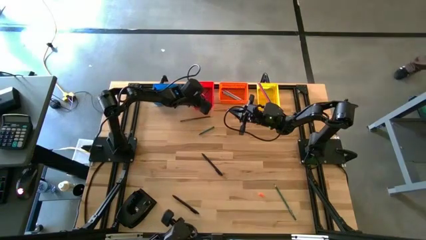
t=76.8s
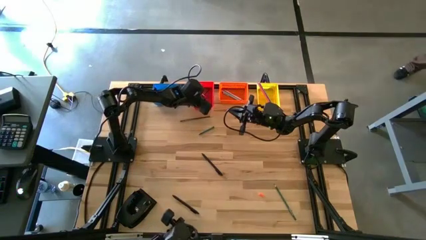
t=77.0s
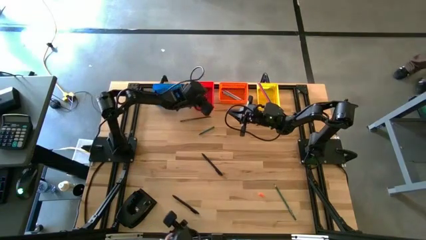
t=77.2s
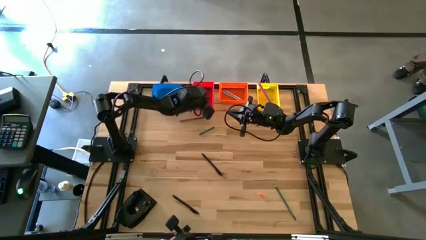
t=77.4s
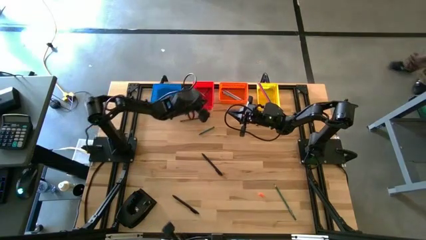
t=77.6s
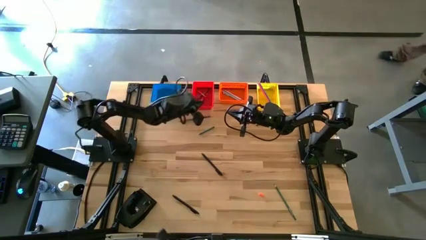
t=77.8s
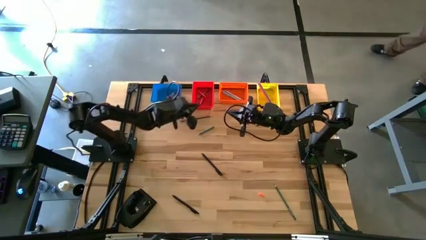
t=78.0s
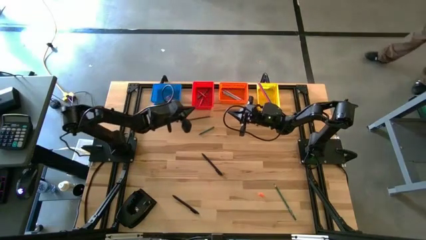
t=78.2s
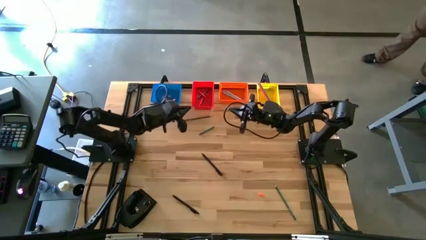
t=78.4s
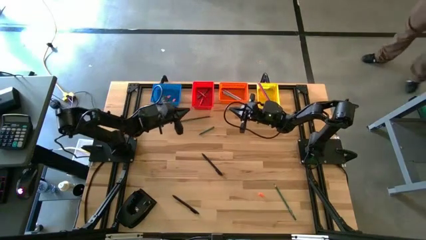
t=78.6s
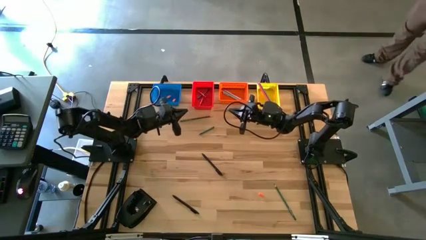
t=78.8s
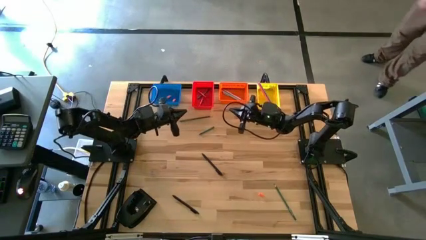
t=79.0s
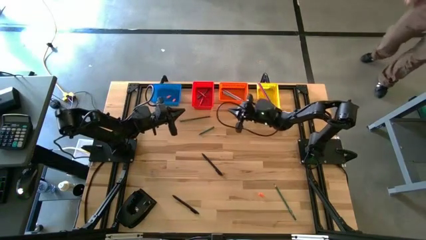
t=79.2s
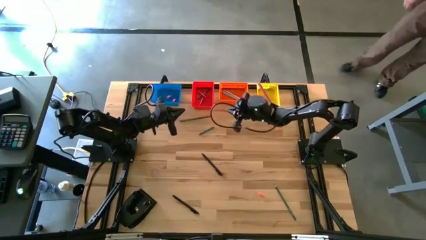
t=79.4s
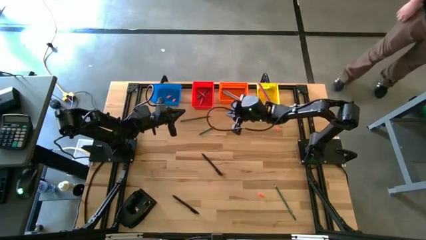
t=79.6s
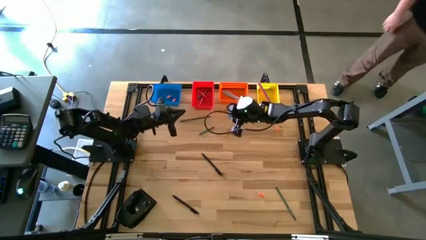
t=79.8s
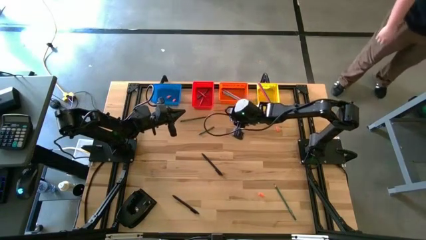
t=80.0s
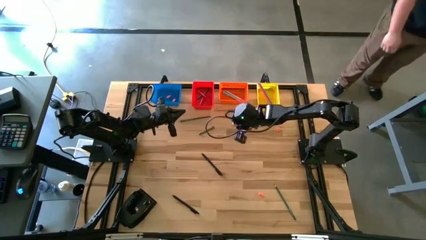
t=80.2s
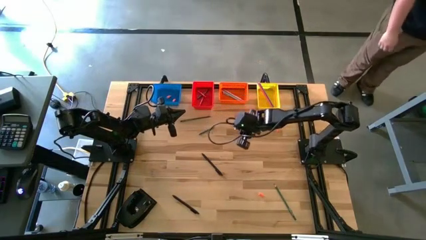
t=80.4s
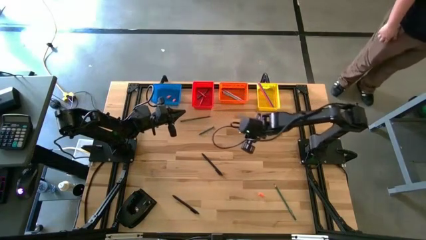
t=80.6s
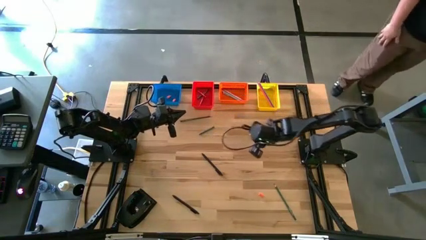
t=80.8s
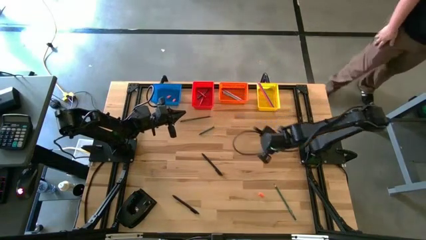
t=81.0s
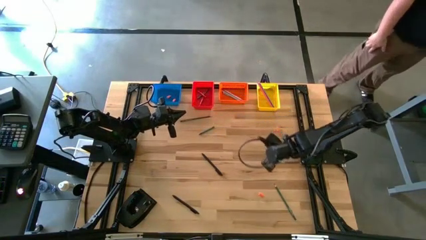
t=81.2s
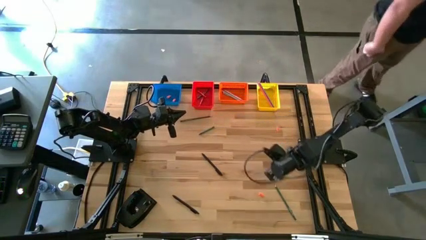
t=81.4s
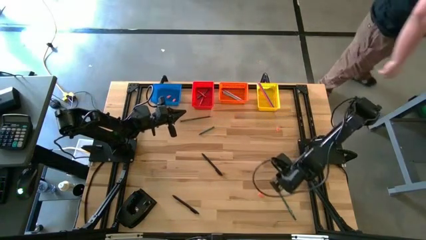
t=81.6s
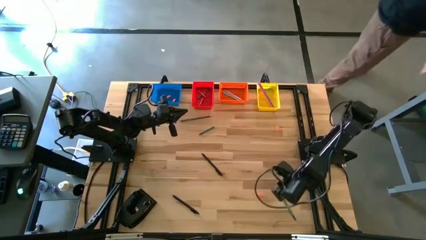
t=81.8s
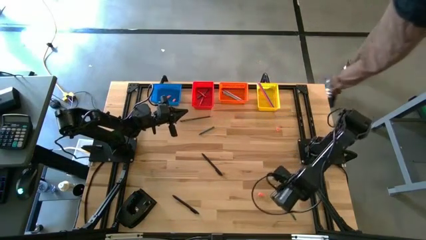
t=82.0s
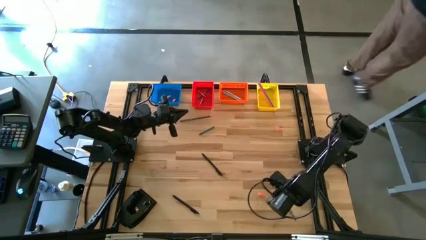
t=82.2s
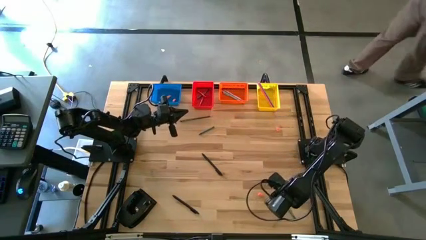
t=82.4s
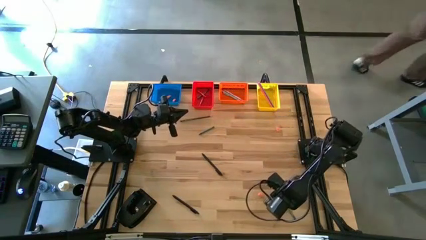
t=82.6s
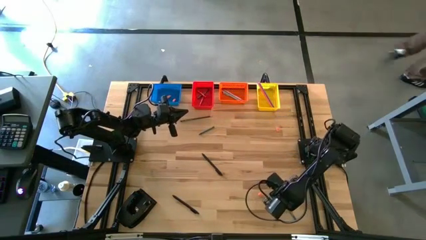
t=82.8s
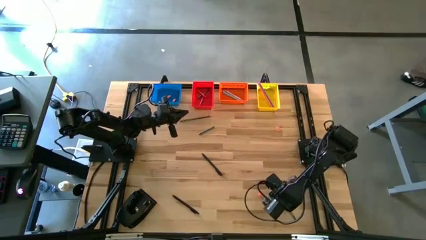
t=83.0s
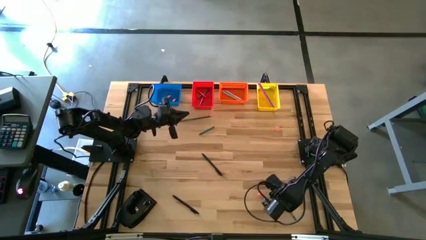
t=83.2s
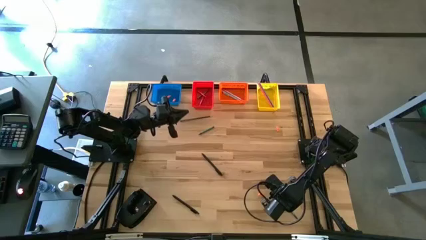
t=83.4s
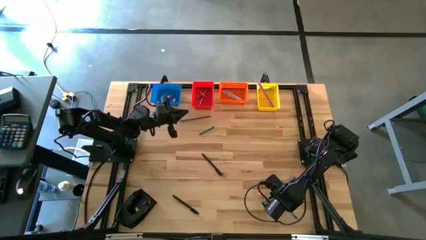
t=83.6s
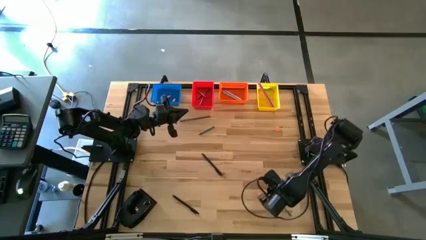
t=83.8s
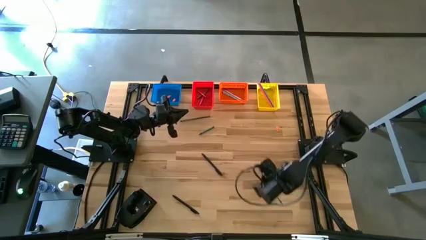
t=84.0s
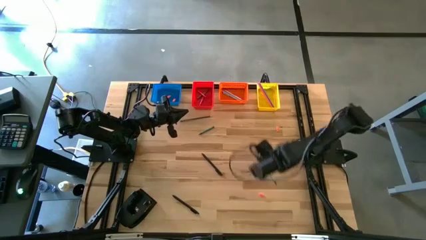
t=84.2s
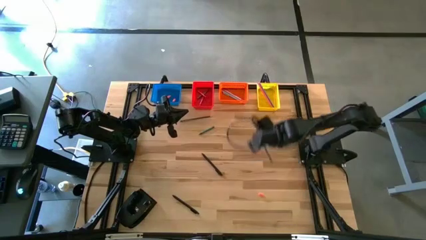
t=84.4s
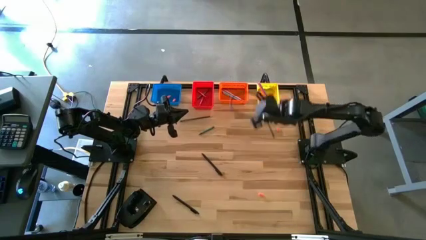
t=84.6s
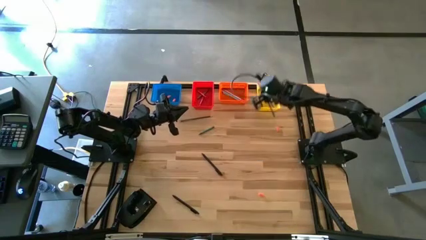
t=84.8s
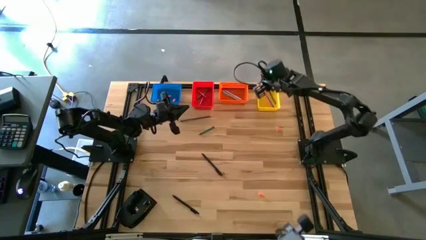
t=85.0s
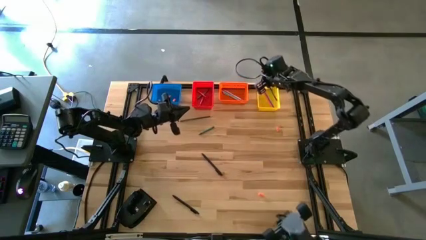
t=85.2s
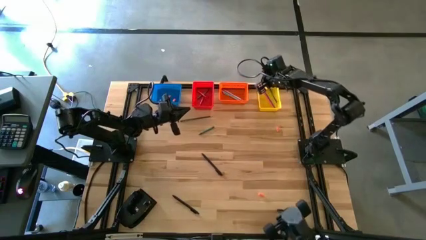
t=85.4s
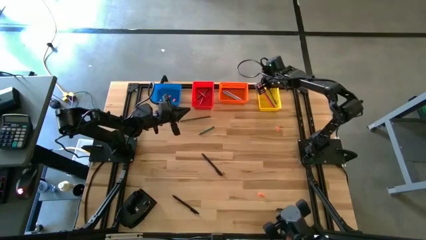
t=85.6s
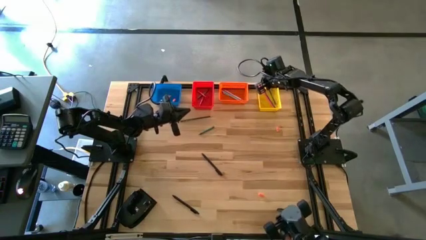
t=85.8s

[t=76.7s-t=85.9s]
Task: Sort crayons/erasers/pens/pencils in bins
Put the green colored pencil into the yellow bin

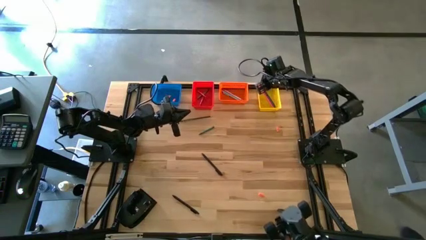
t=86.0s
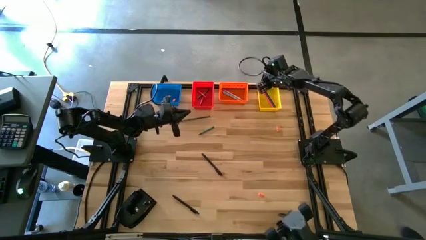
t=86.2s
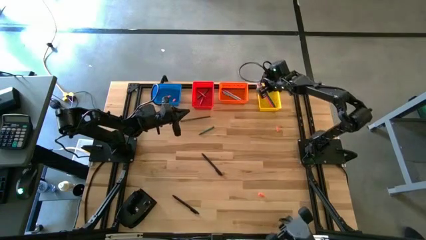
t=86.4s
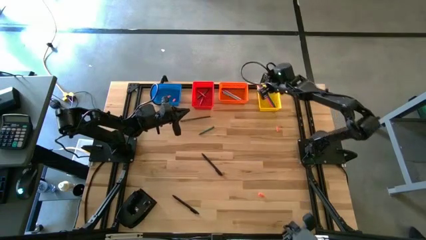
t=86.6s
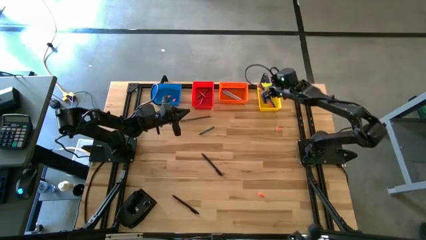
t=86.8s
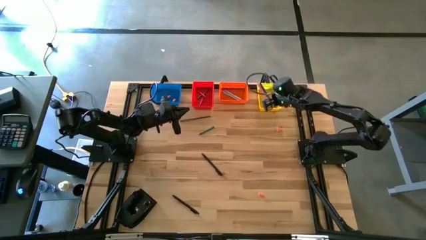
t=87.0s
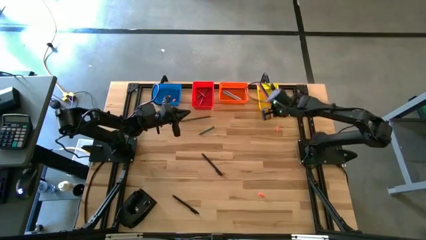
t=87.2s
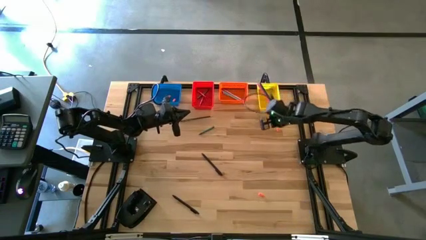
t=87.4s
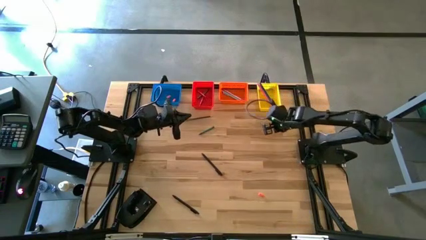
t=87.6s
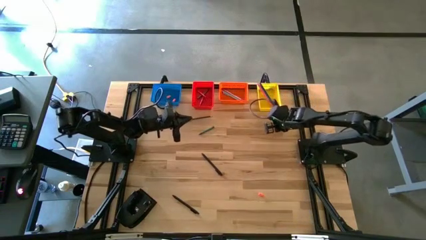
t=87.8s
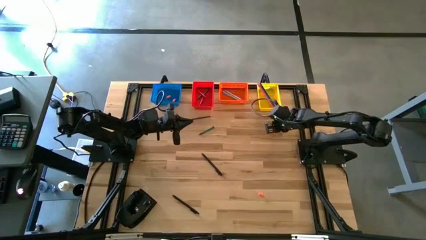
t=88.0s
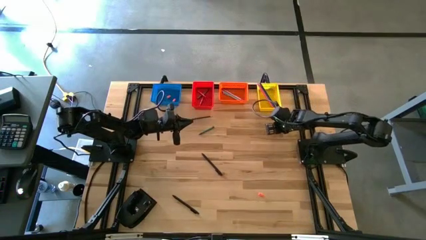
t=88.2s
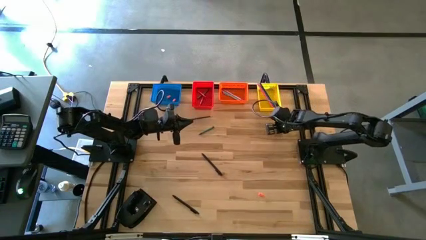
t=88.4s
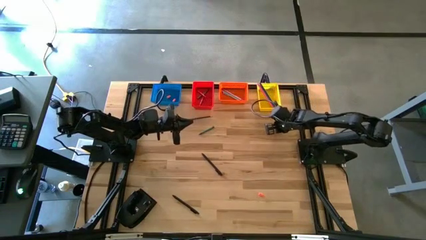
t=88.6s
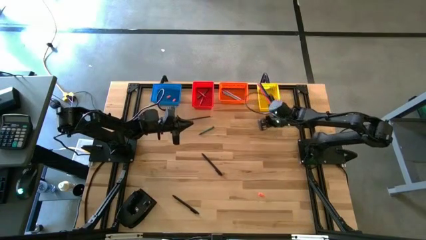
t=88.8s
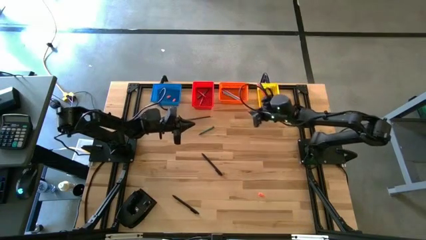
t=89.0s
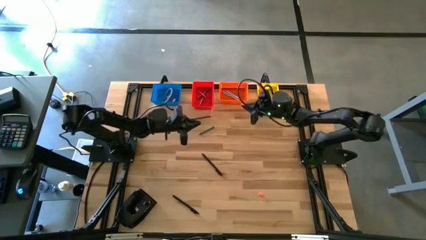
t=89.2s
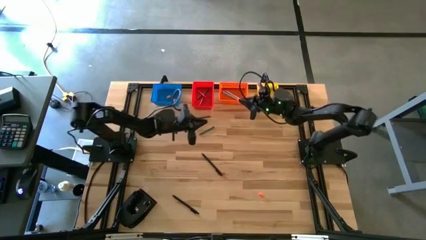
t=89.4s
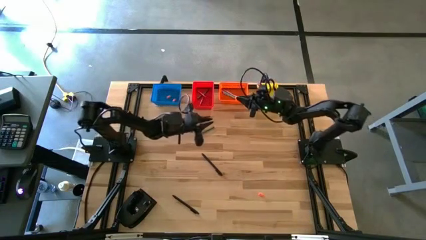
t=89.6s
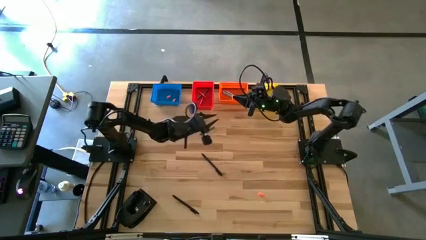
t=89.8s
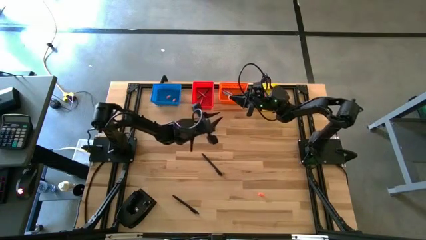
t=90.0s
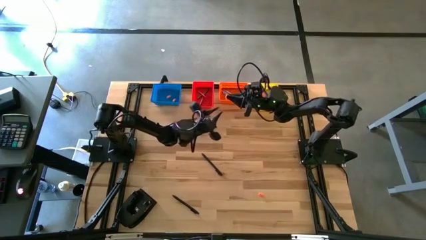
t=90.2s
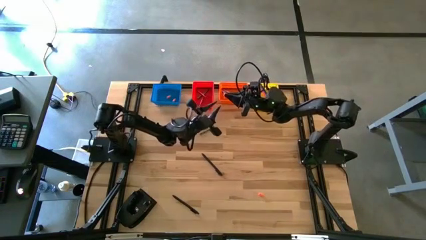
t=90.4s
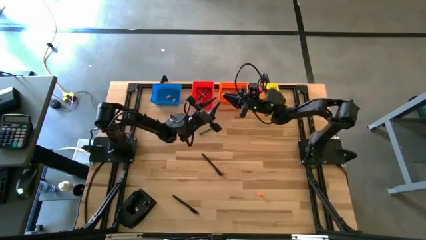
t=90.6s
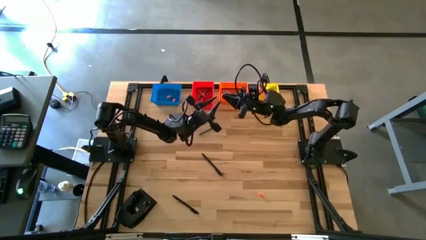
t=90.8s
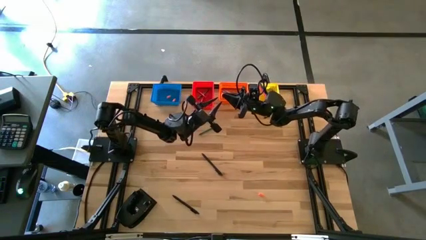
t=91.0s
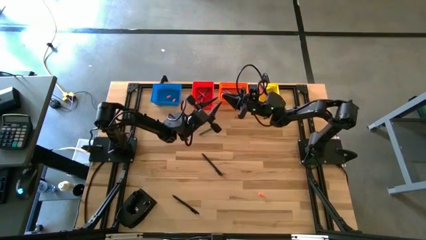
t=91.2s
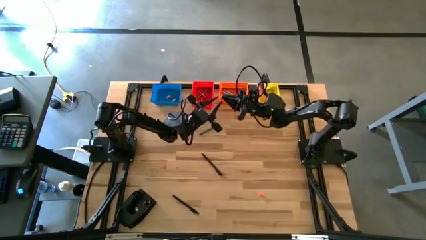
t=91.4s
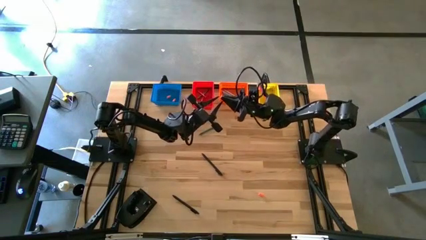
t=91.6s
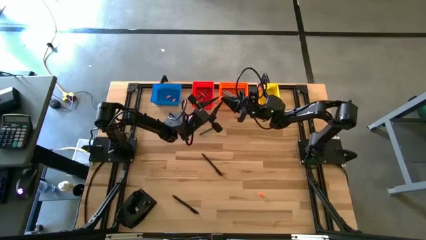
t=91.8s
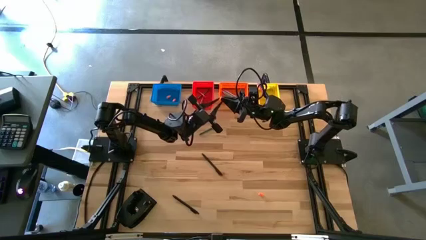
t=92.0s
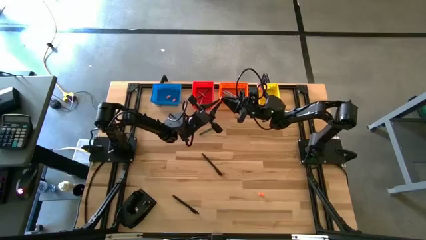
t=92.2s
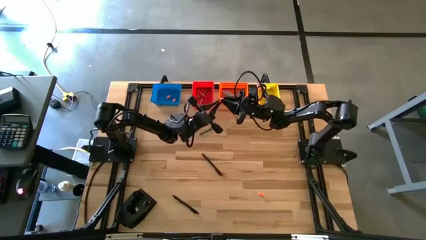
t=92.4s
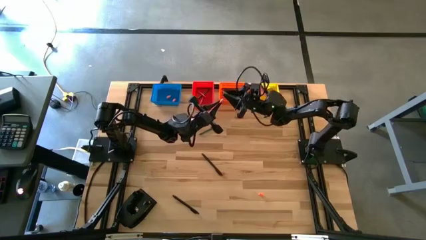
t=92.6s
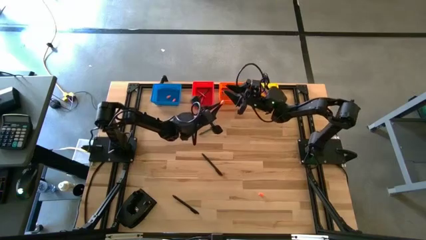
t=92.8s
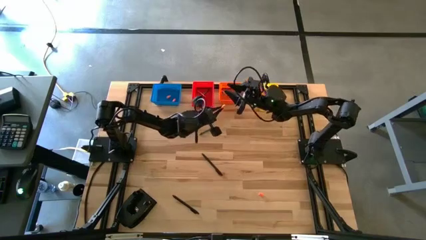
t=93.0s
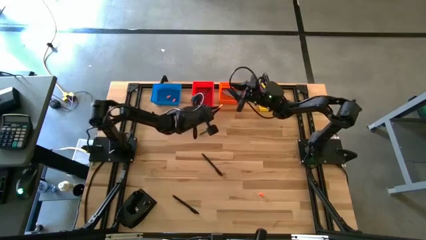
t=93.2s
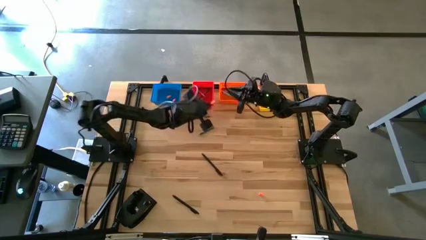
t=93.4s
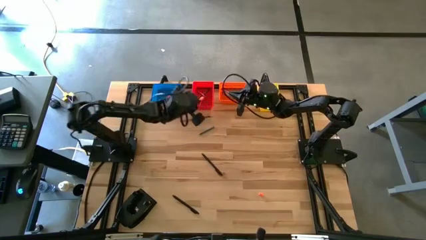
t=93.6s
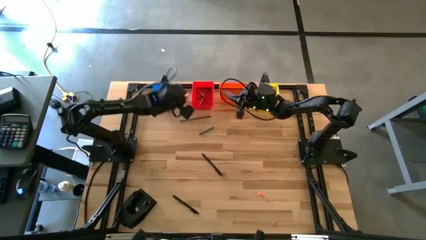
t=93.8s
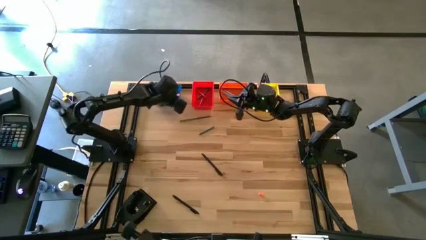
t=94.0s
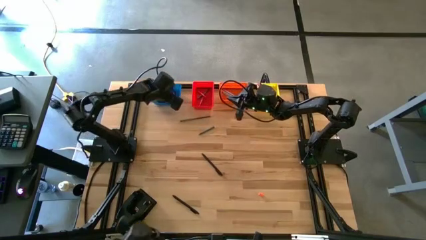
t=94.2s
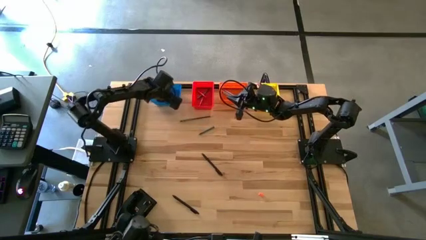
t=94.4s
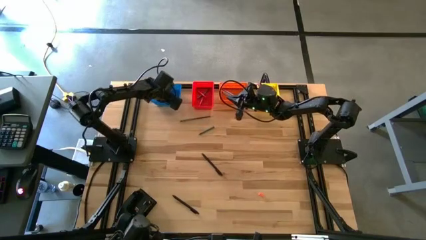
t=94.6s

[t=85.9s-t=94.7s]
Put the orange eraser into the blue bin
